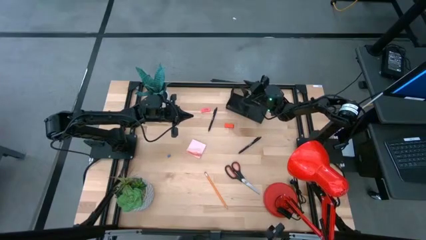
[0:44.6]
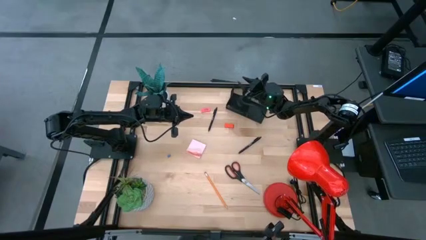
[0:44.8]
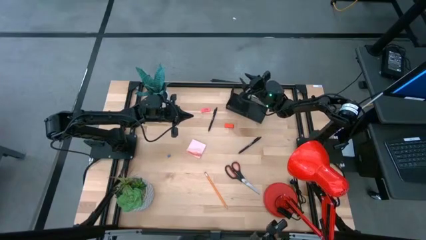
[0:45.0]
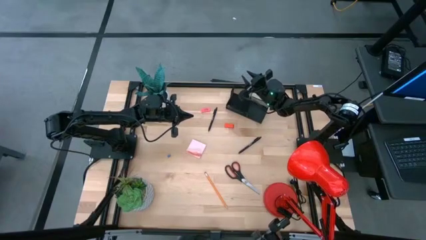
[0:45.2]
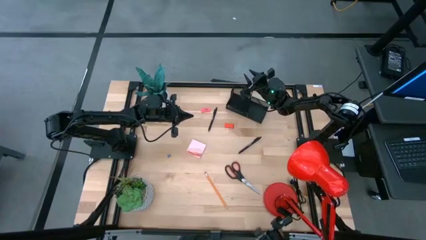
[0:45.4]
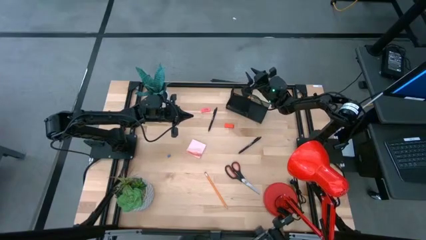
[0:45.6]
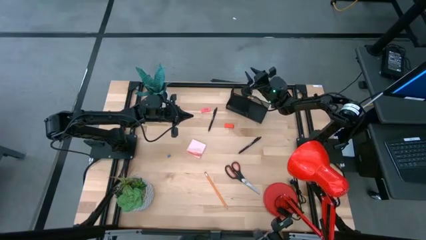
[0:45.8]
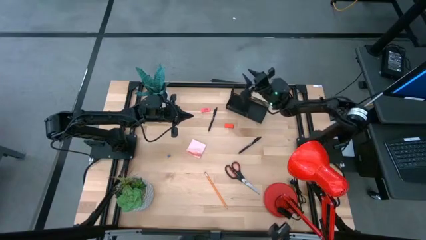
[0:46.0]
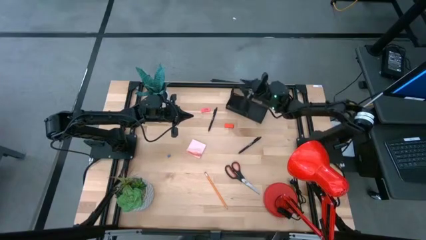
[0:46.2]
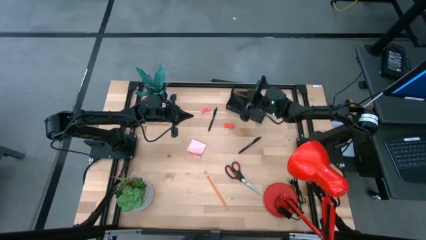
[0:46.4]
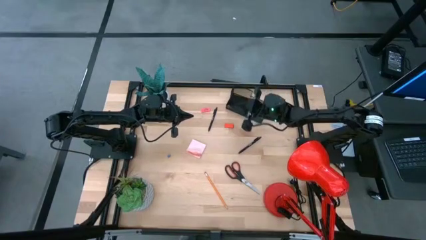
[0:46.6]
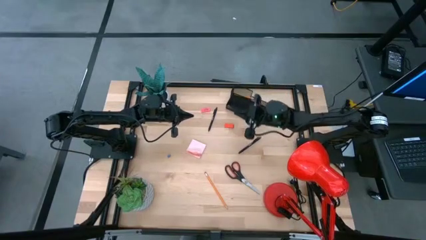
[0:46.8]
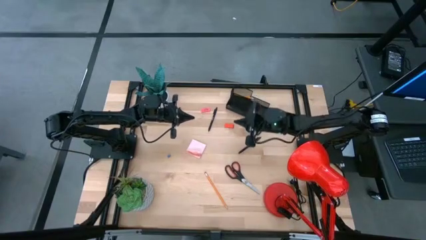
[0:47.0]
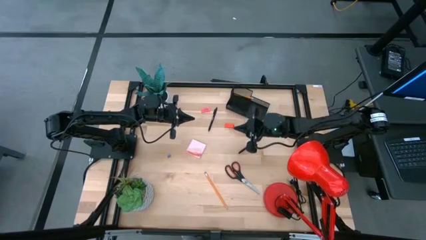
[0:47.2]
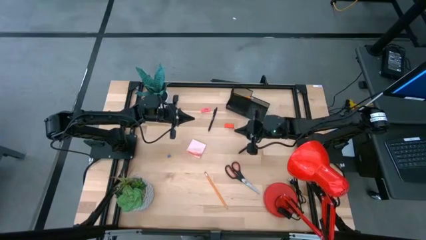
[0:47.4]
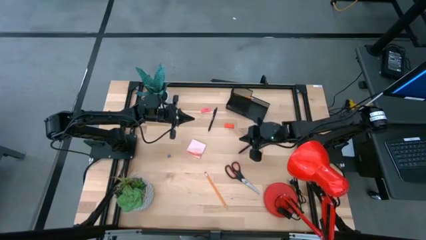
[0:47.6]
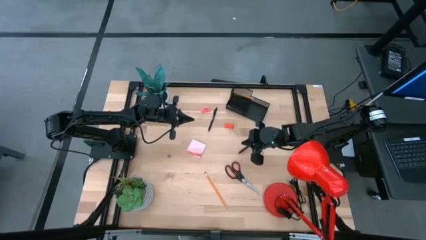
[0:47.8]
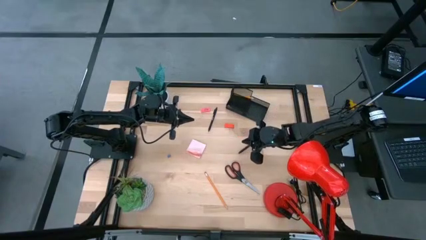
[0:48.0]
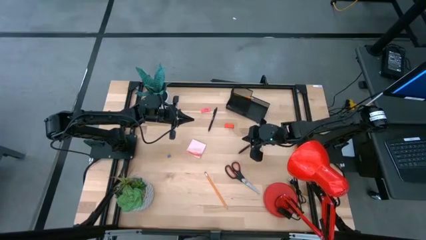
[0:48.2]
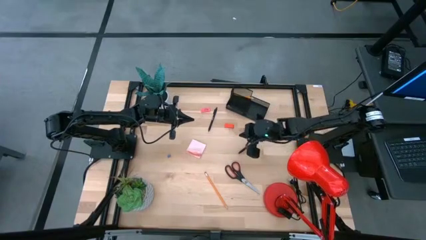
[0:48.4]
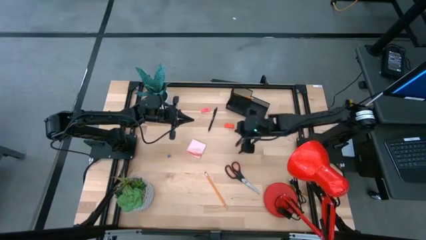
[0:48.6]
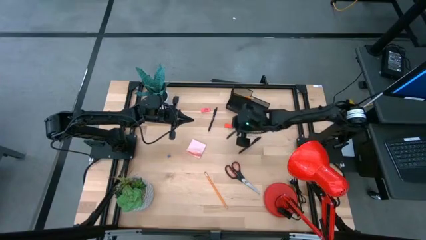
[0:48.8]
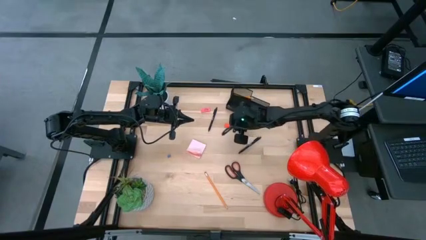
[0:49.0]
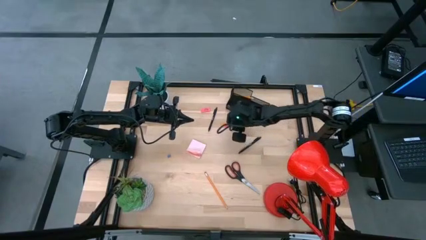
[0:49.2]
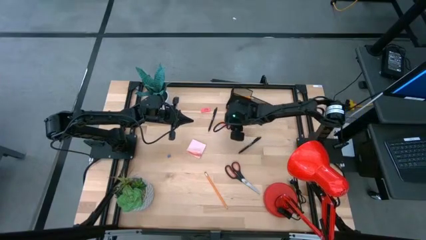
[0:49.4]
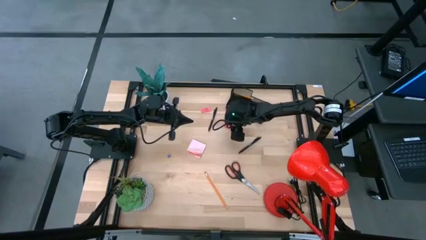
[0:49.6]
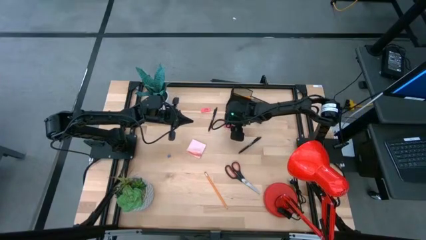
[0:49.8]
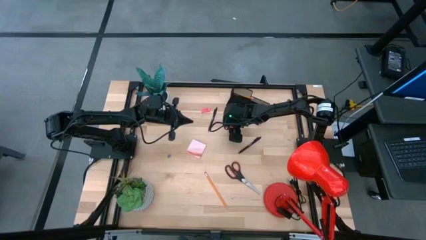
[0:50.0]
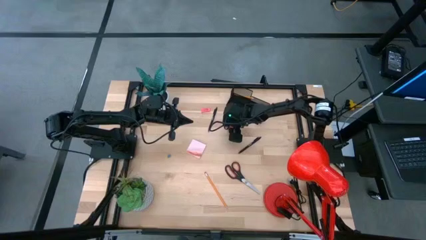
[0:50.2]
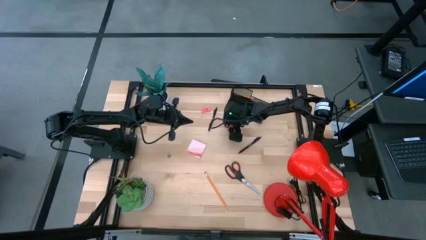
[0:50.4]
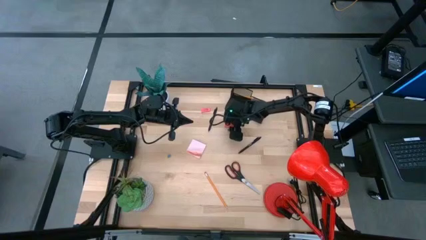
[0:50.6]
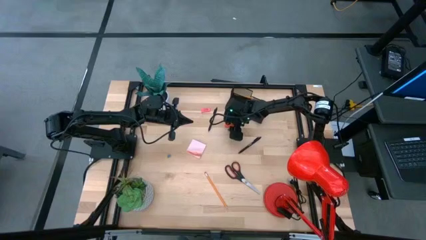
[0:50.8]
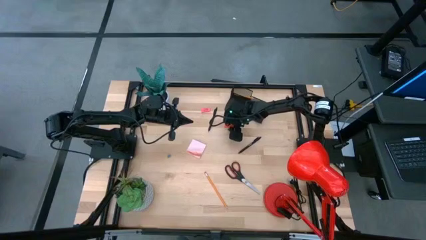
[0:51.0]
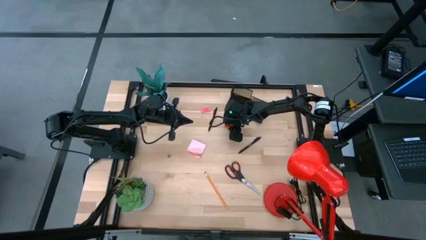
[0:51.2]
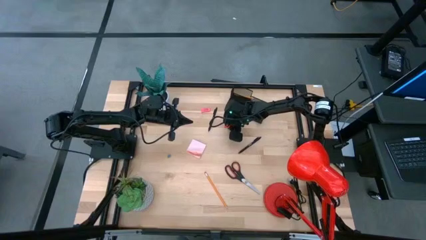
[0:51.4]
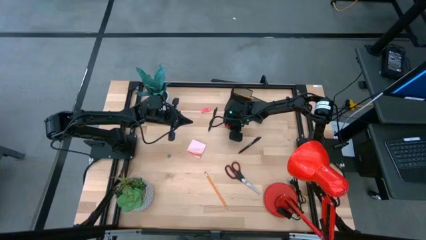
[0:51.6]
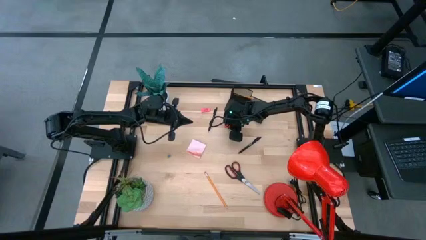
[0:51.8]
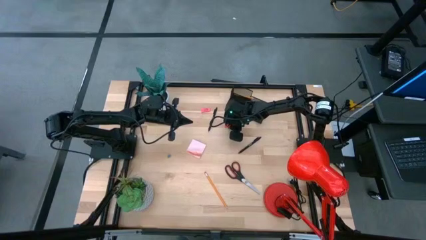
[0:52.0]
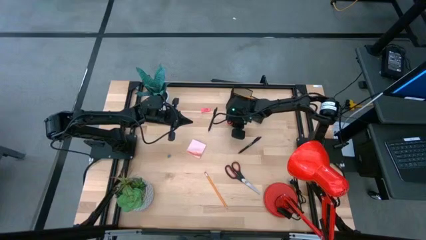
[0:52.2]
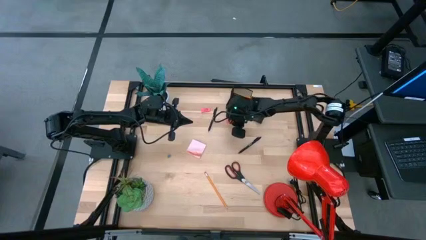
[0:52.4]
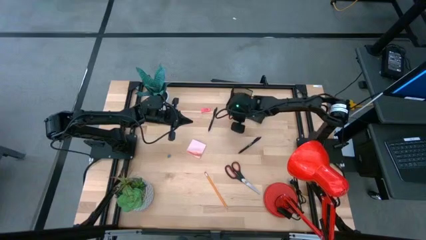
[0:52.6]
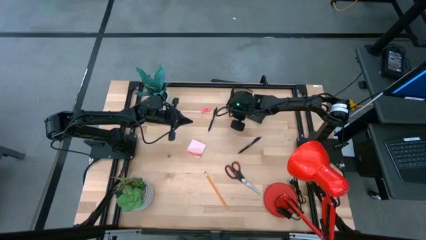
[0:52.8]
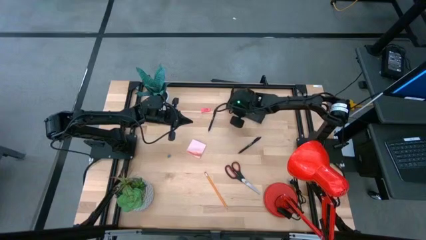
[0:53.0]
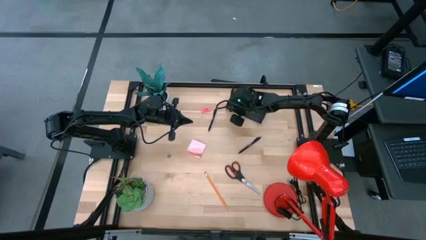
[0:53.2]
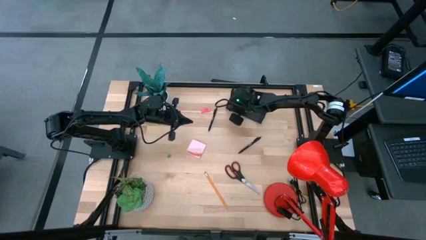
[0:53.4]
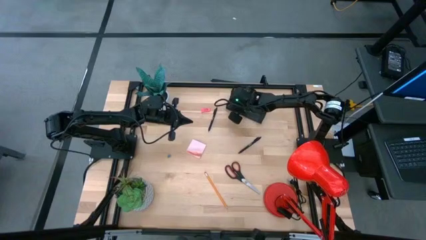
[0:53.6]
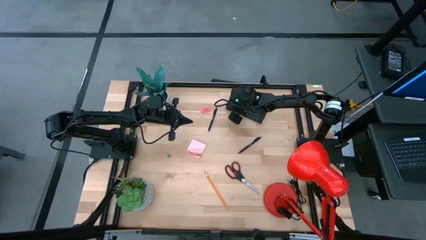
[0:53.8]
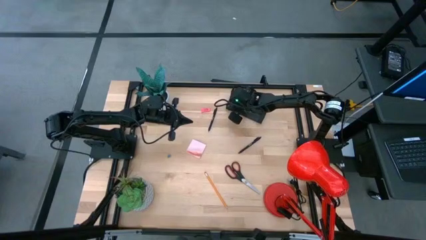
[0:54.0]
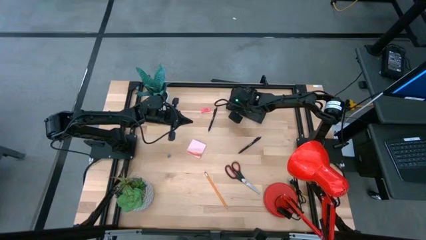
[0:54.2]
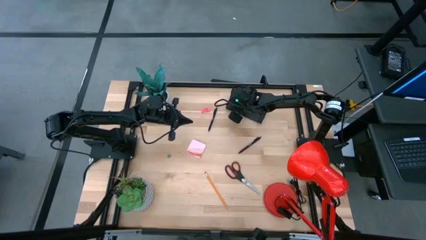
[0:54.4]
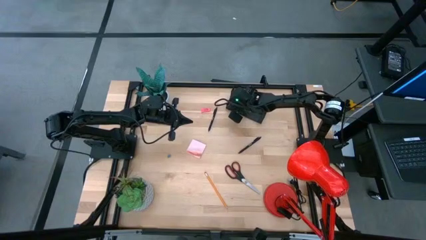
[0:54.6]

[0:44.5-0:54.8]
Task: Pick and place office supplies into organizer
Put the orange eraser into the black desk organizer
